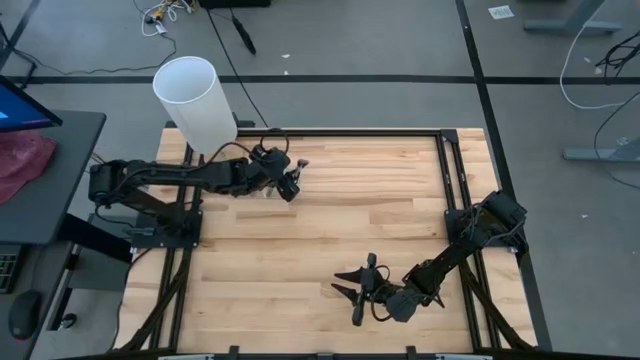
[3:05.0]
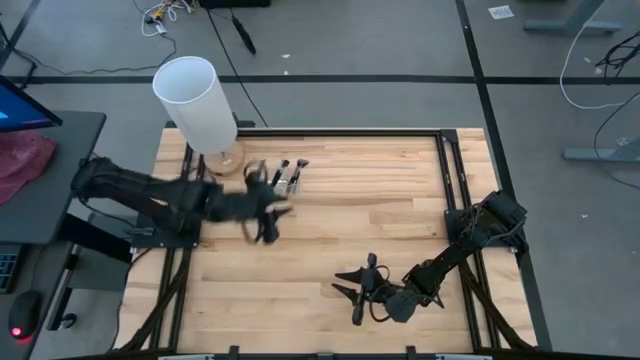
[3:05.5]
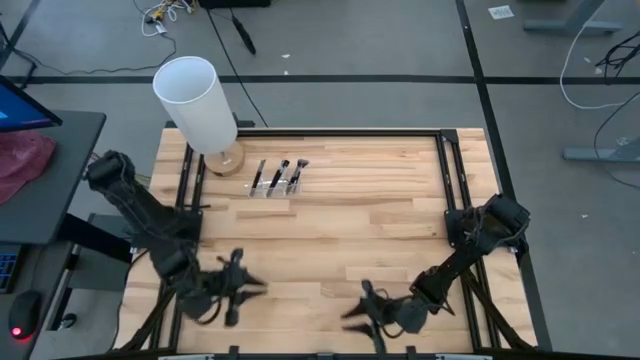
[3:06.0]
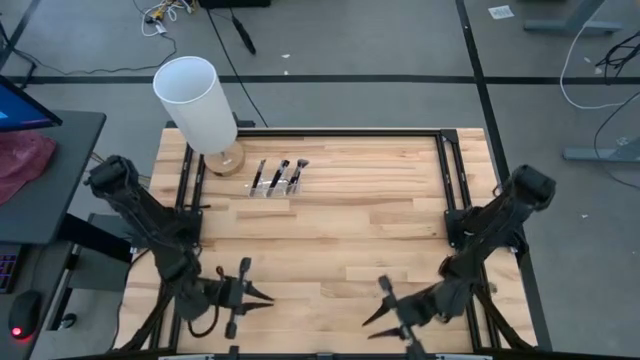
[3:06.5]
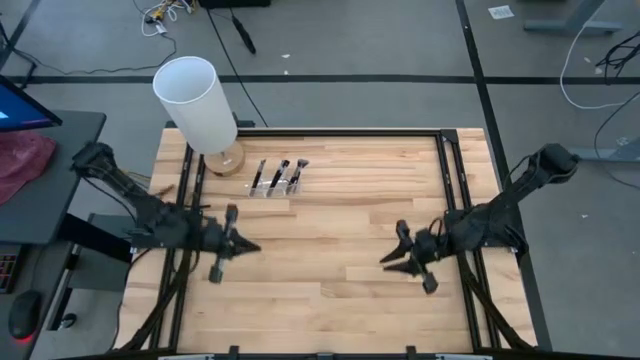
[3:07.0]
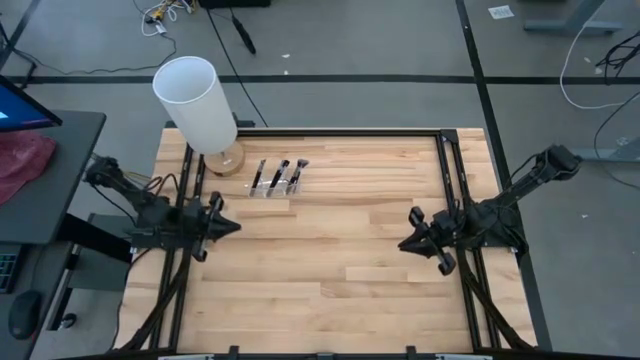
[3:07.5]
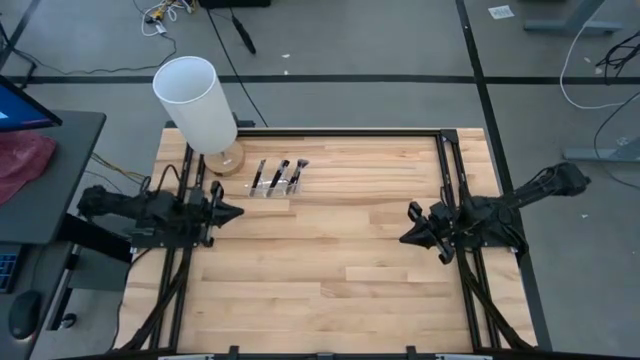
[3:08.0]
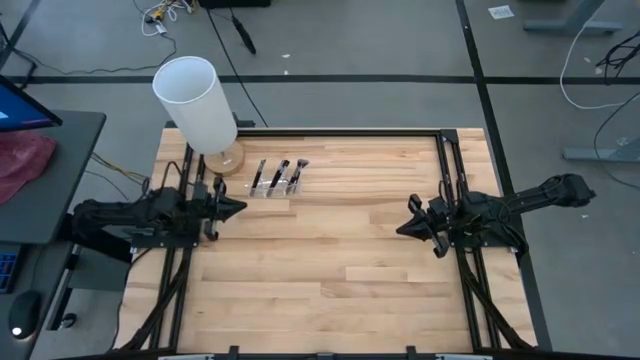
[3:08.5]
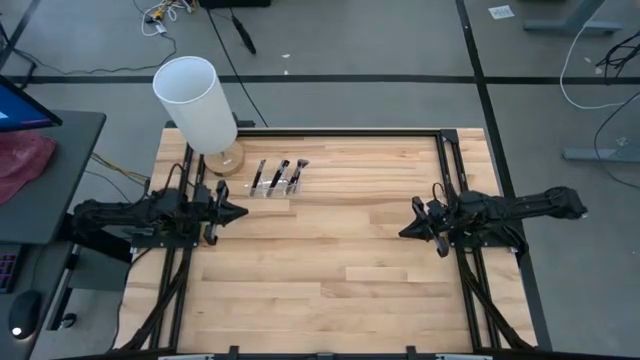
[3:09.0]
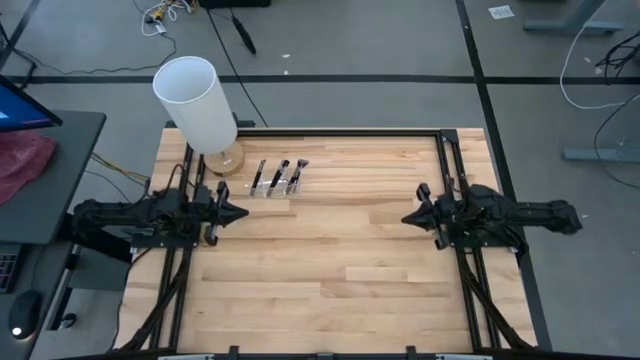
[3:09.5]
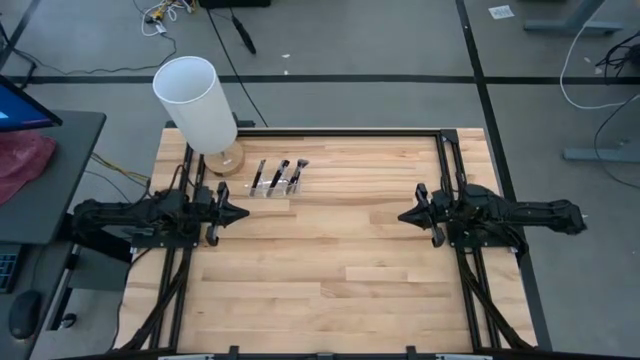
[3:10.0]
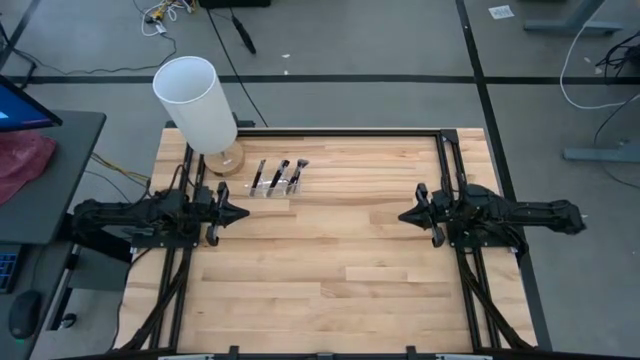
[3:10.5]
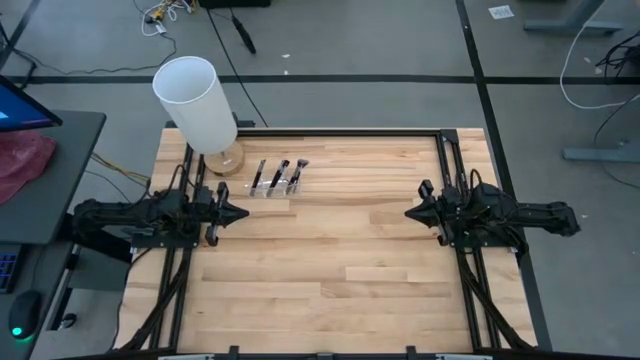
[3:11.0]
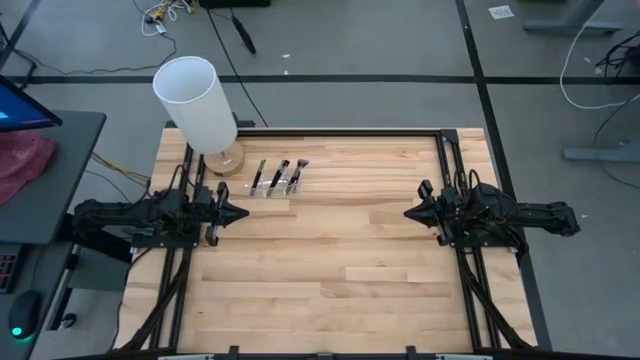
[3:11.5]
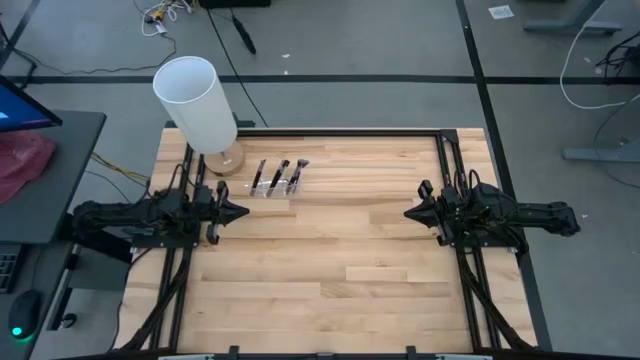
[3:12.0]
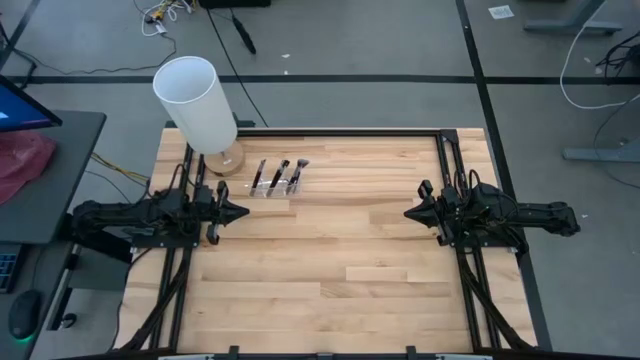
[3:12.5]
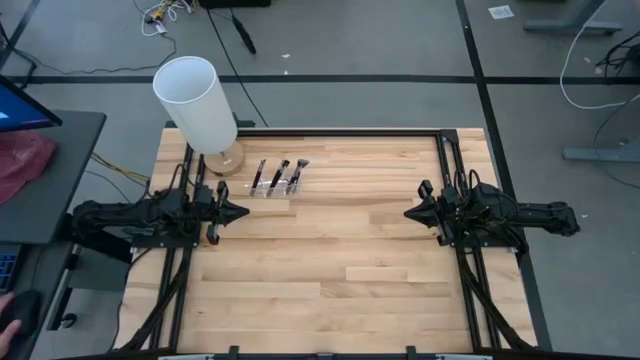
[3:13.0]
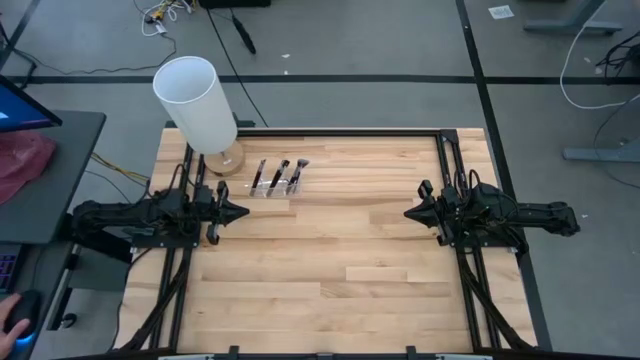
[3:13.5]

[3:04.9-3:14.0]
Task: Put items in baskets/containers
Return to Home Position

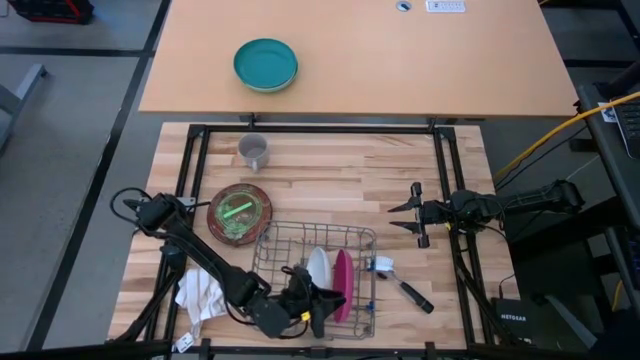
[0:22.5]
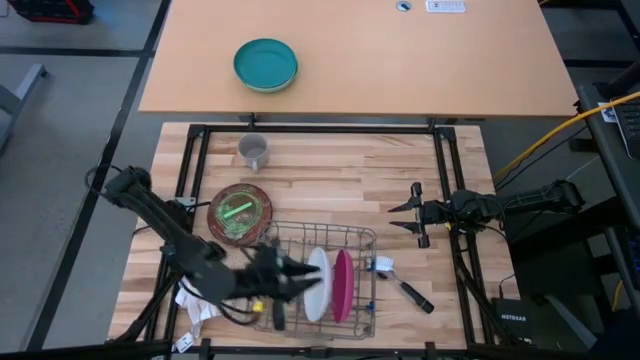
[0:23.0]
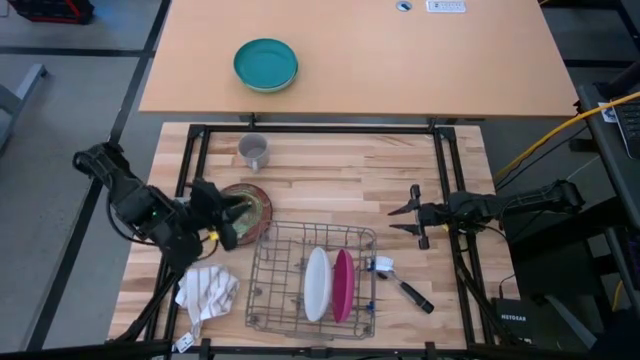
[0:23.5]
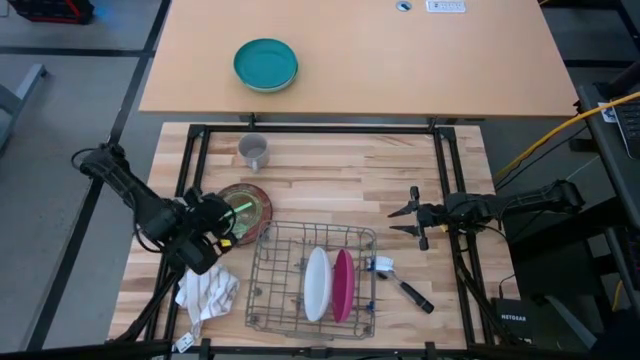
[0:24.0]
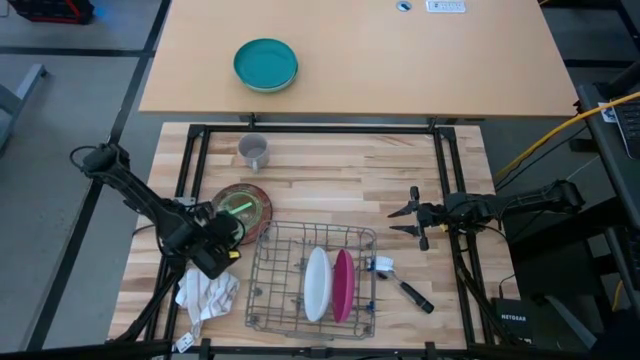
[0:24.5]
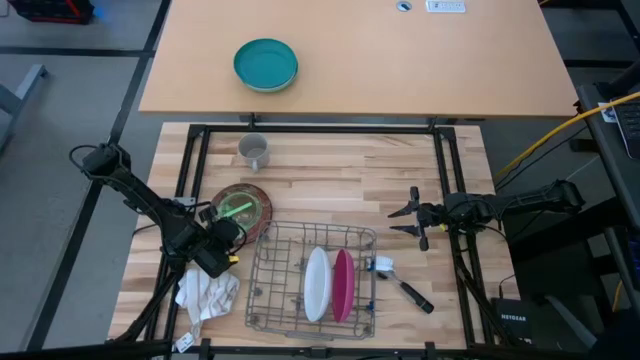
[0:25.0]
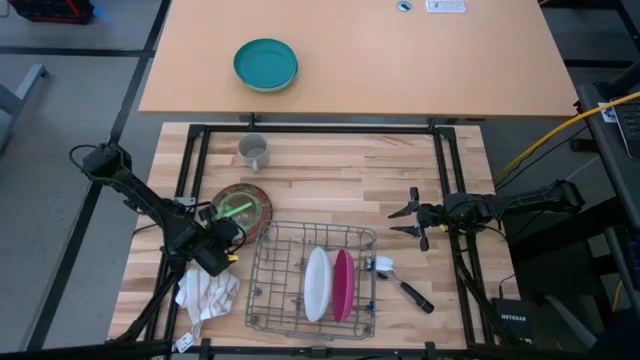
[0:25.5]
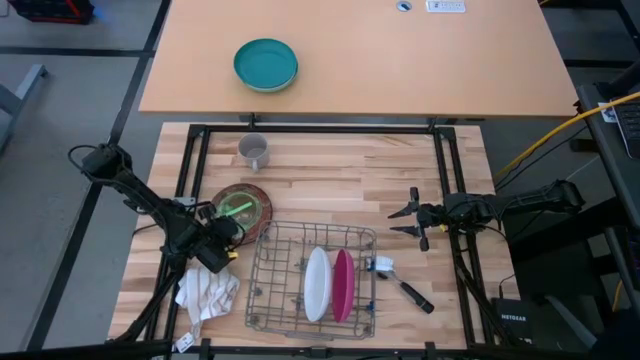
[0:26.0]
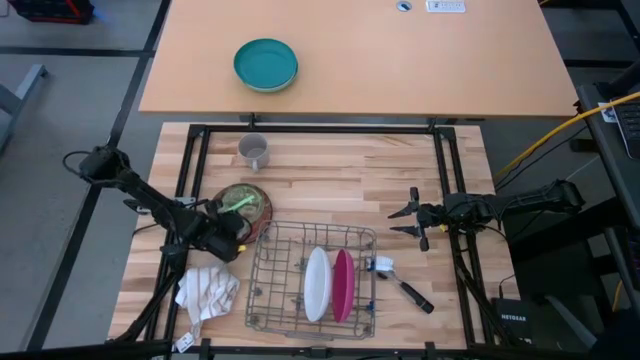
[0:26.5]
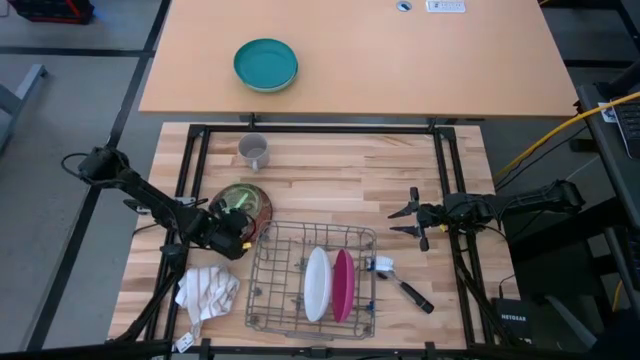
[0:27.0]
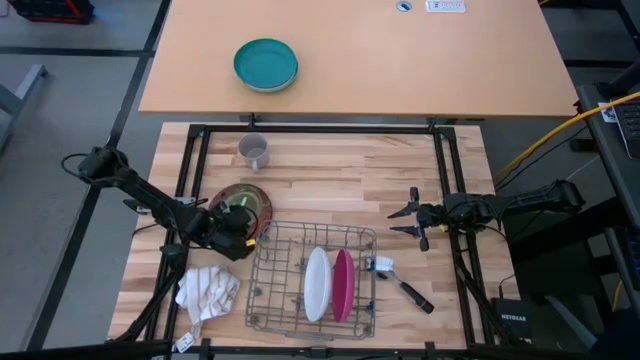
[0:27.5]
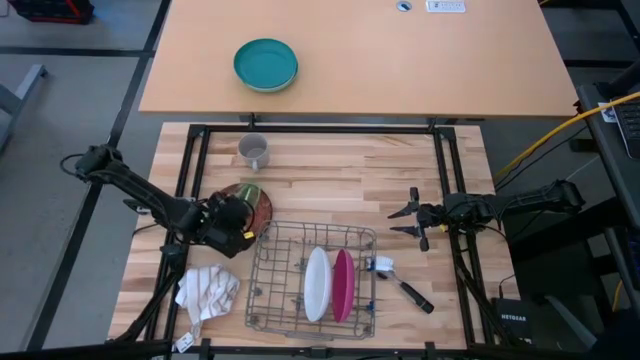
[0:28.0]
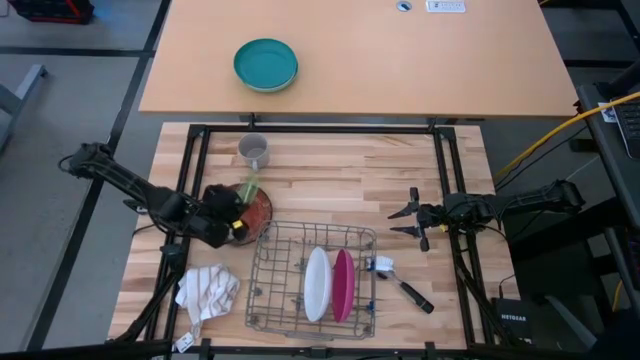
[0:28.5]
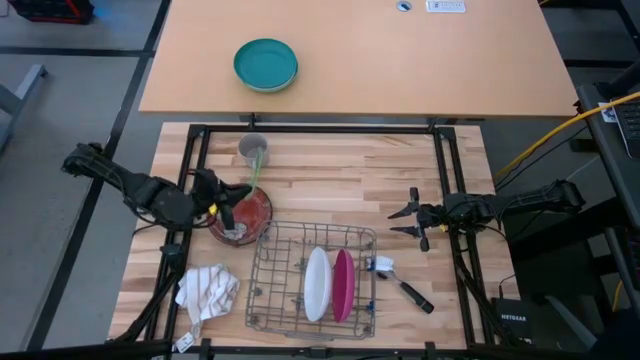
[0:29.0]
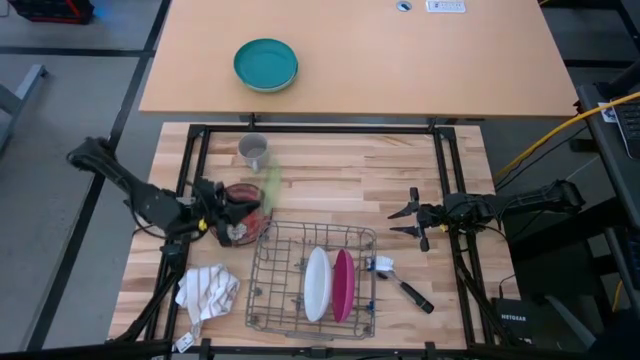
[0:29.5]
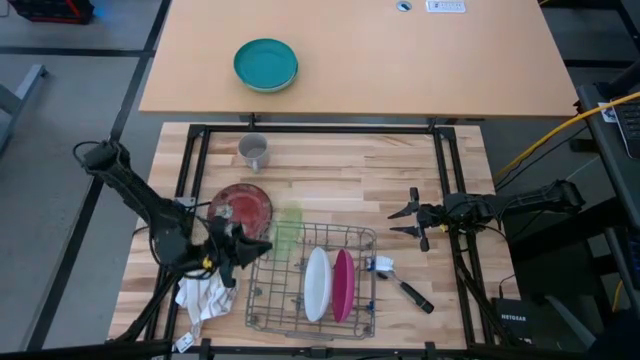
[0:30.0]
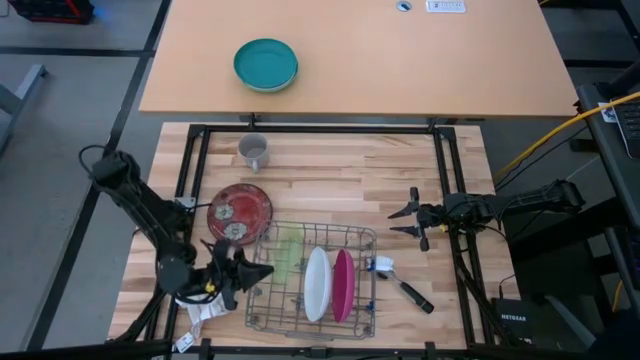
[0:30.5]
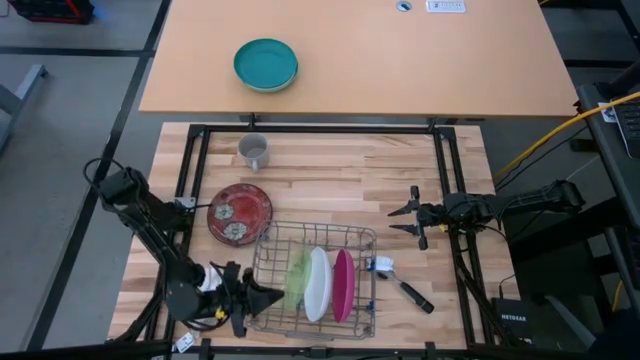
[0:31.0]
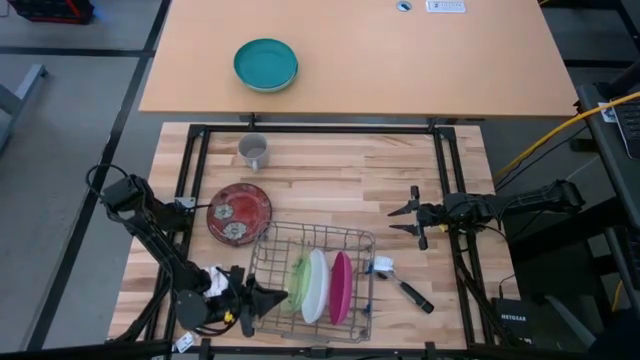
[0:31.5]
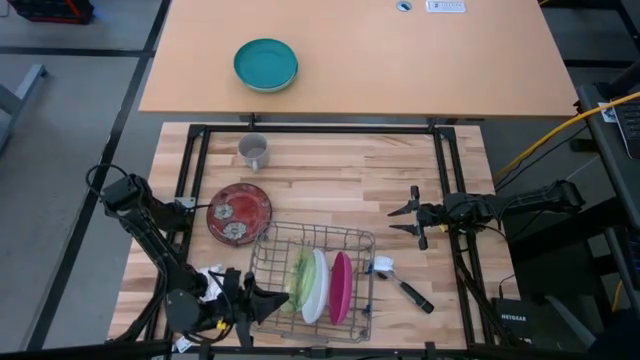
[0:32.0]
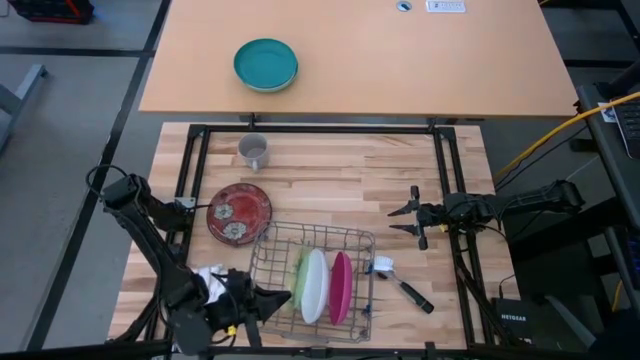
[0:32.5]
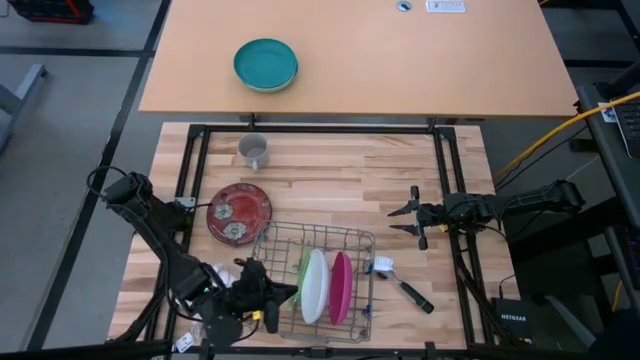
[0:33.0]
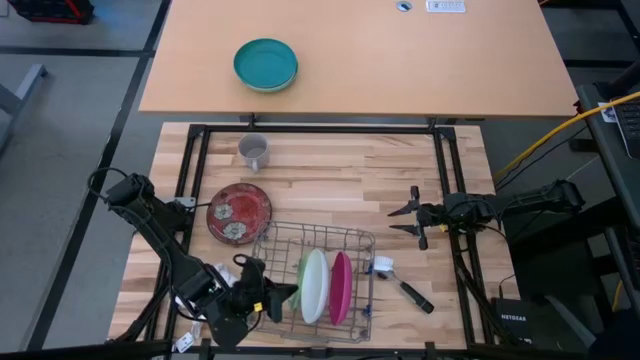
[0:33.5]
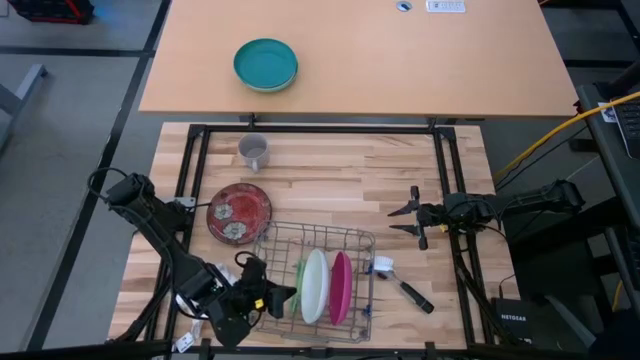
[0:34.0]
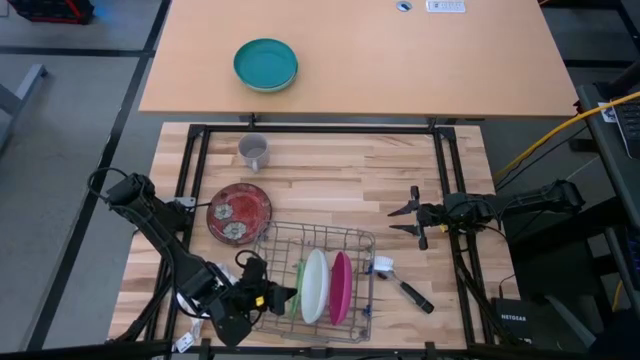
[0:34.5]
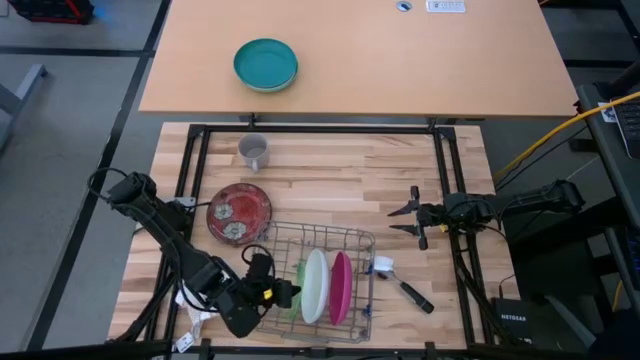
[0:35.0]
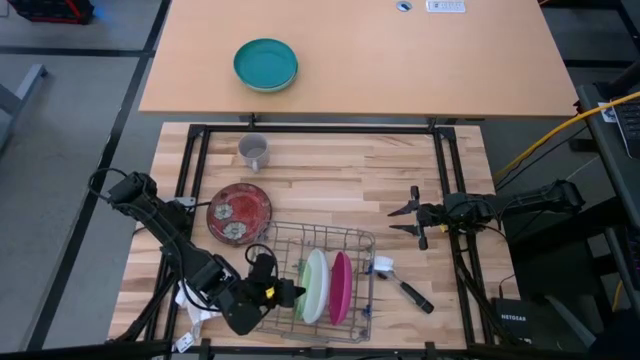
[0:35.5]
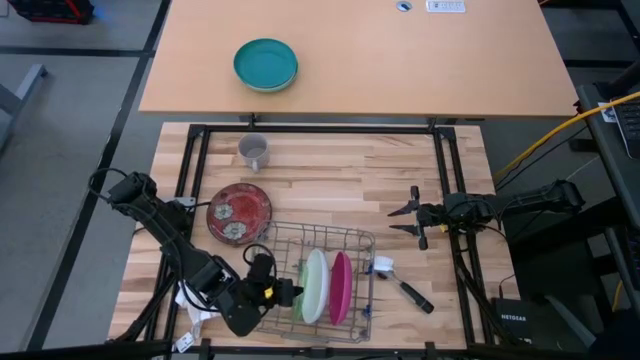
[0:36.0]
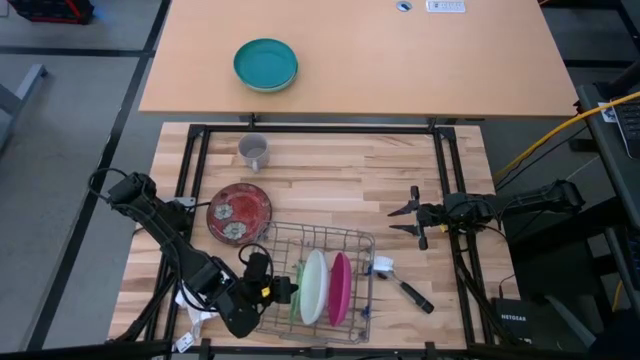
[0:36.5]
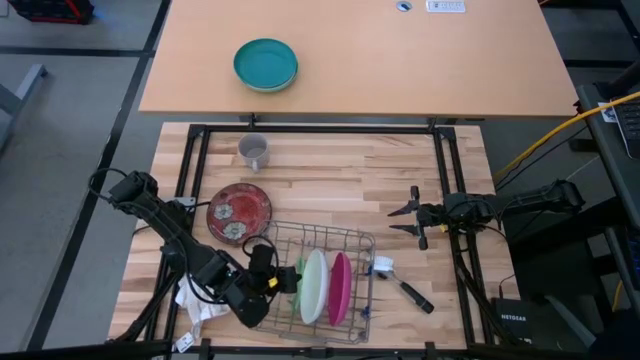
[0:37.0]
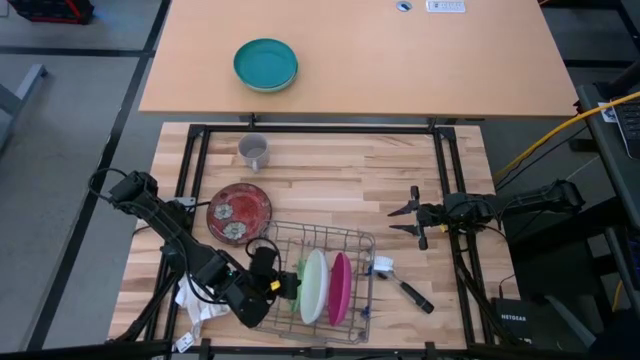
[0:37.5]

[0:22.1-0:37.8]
Task: Sort dishes
Put the green plate into the dish rack
